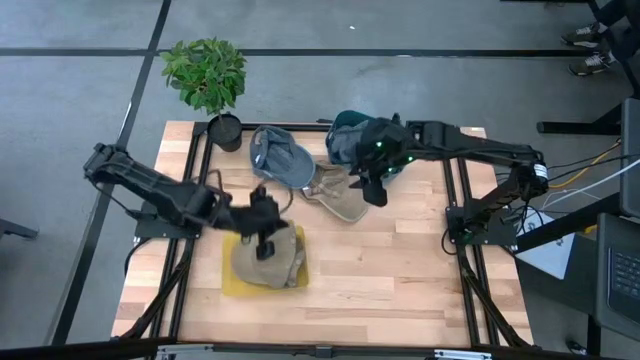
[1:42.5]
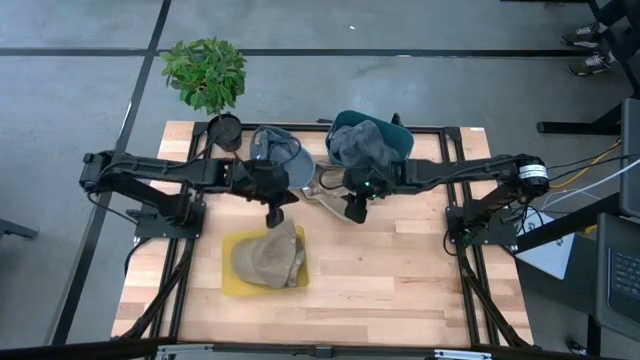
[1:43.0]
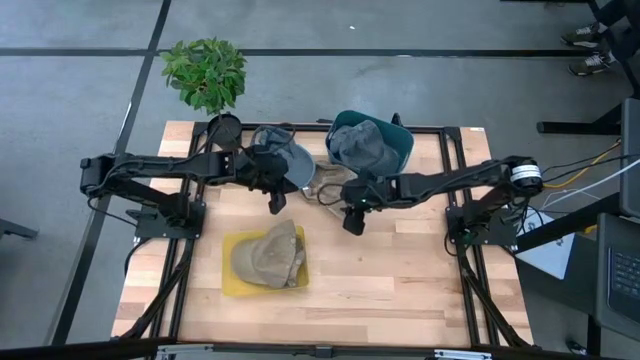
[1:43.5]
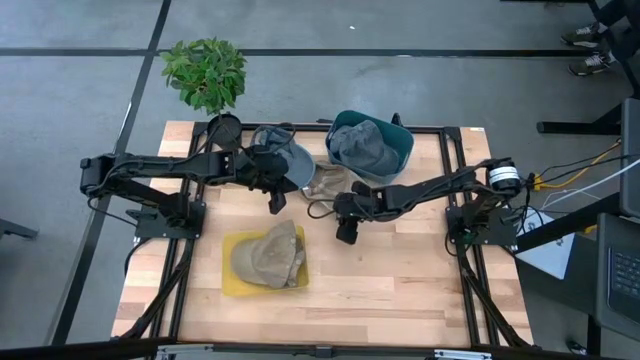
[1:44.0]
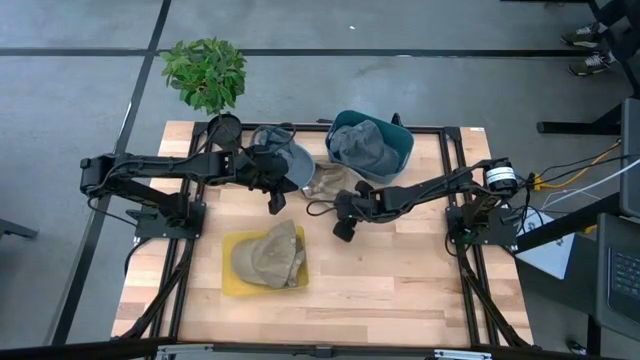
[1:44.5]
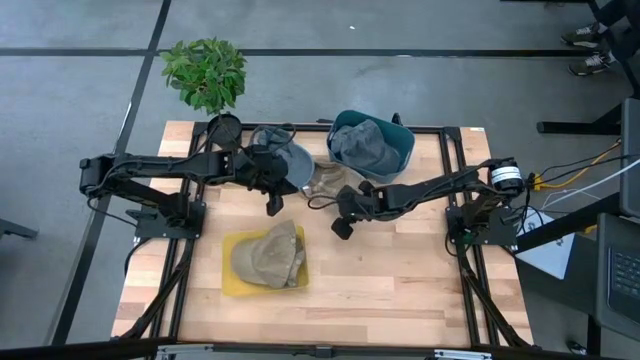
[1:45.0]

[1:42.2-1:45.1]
Task: Pick & Place hat
Put the brown cap into the yellow bin

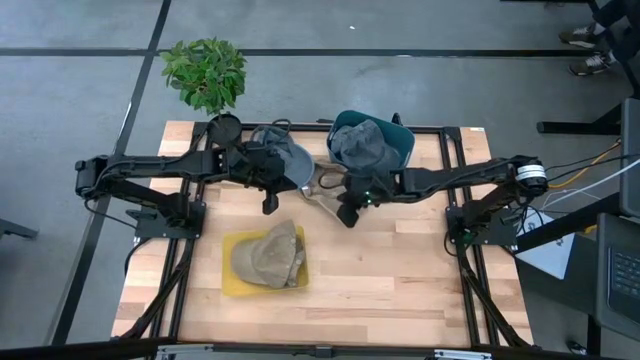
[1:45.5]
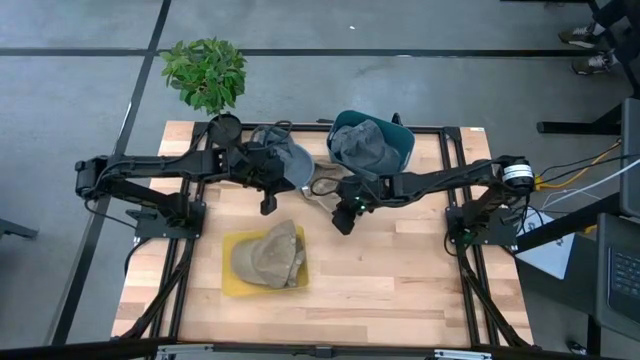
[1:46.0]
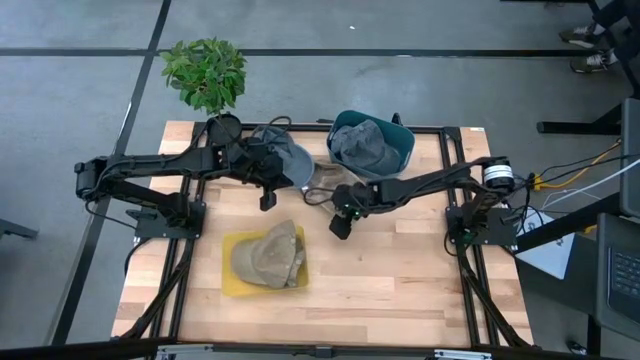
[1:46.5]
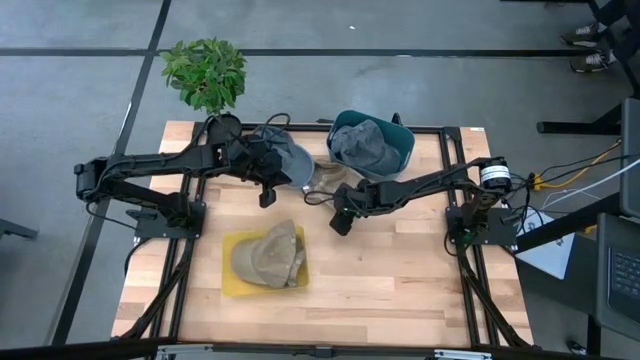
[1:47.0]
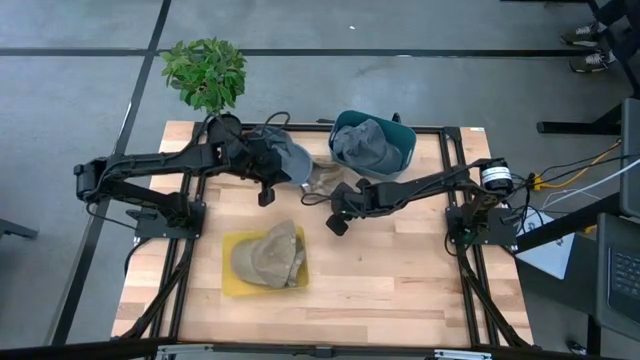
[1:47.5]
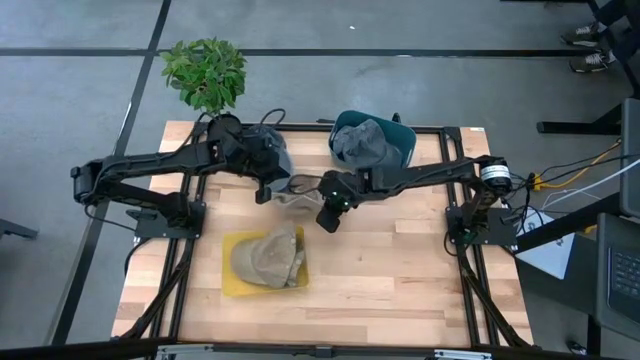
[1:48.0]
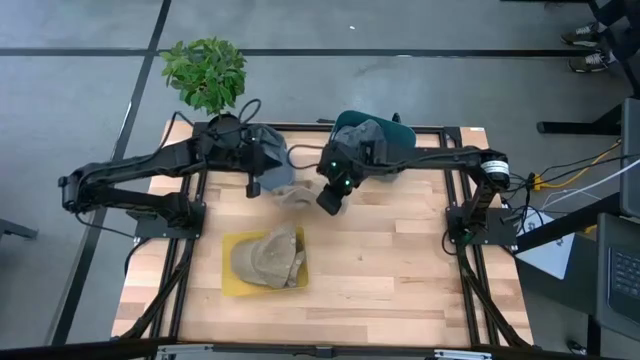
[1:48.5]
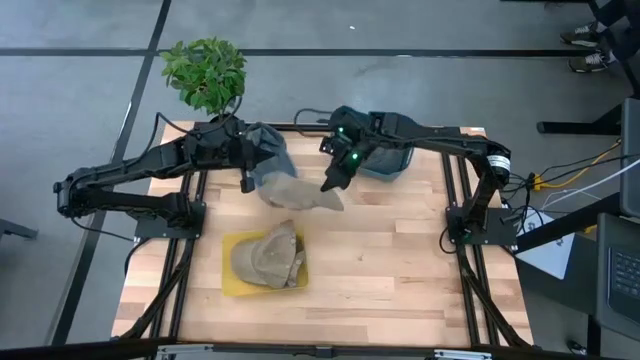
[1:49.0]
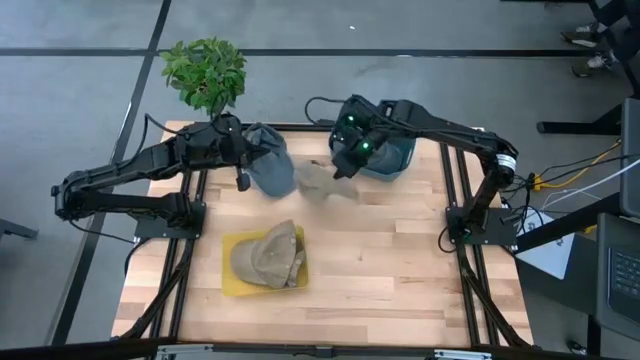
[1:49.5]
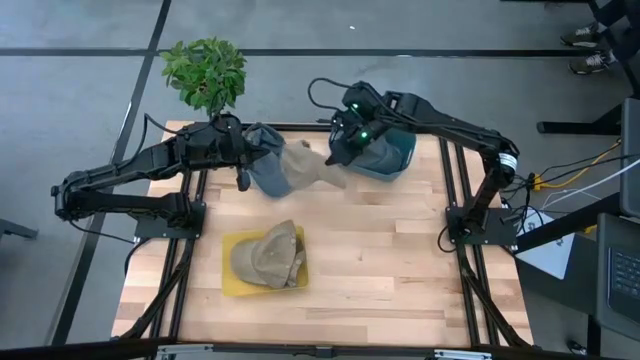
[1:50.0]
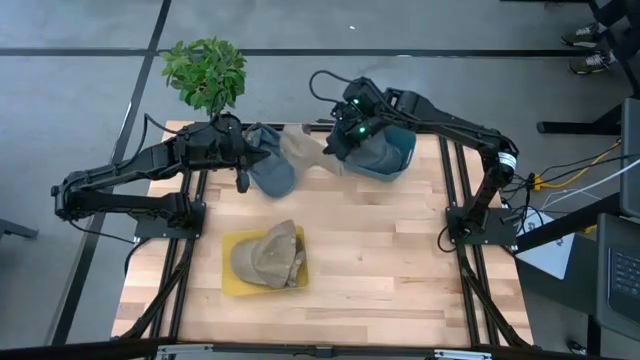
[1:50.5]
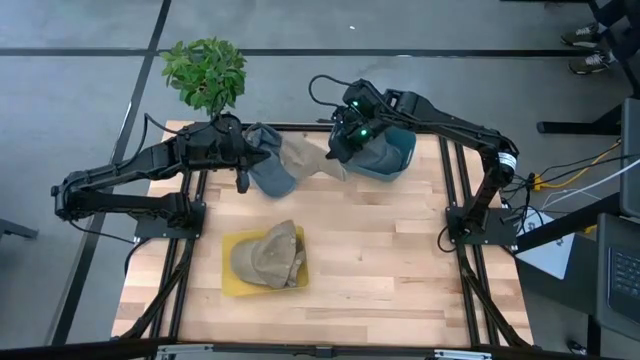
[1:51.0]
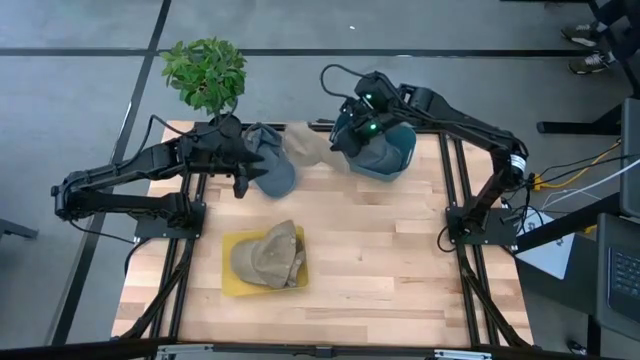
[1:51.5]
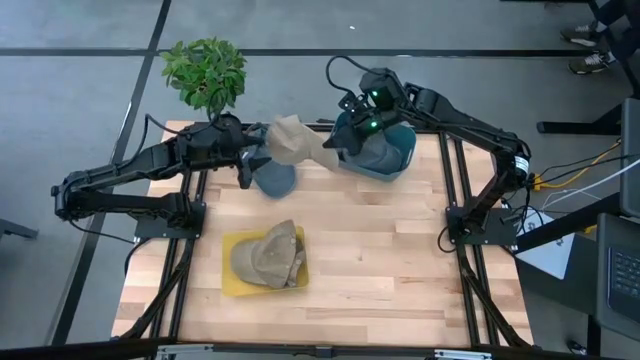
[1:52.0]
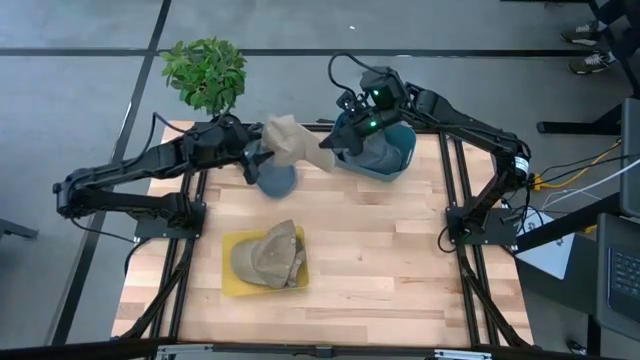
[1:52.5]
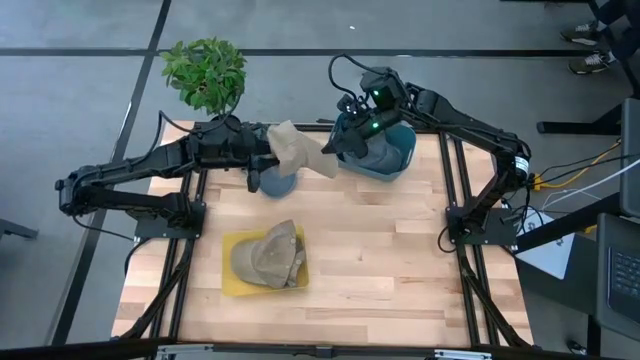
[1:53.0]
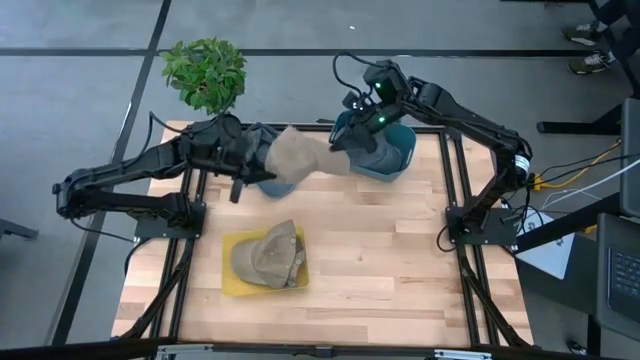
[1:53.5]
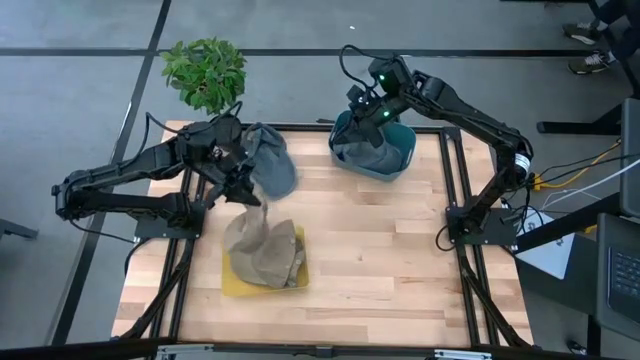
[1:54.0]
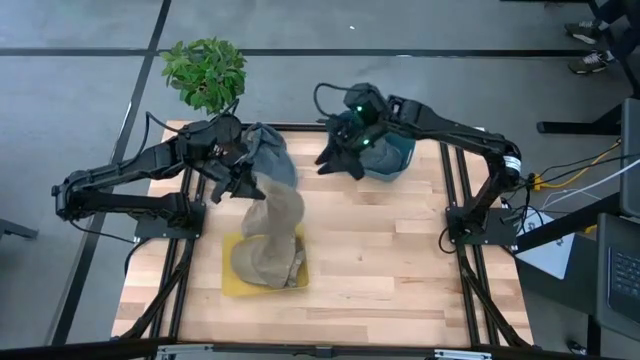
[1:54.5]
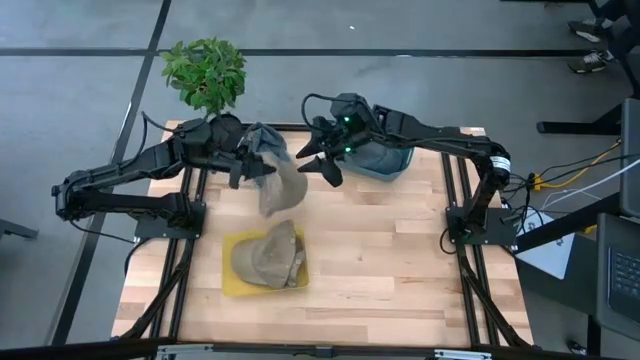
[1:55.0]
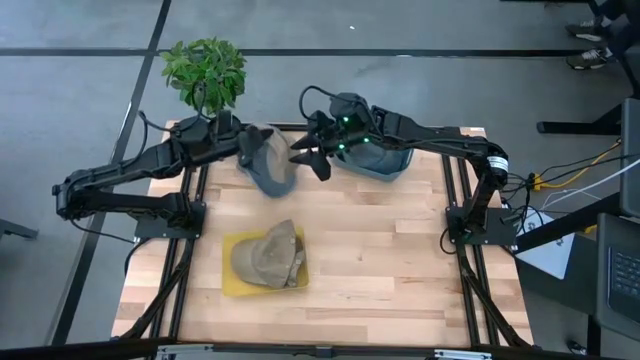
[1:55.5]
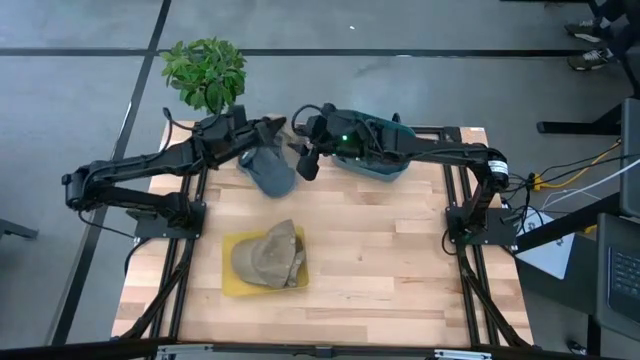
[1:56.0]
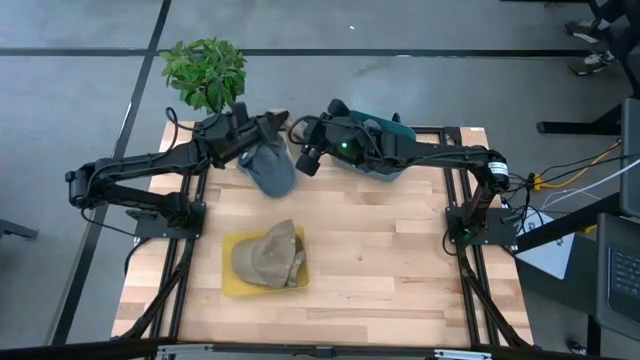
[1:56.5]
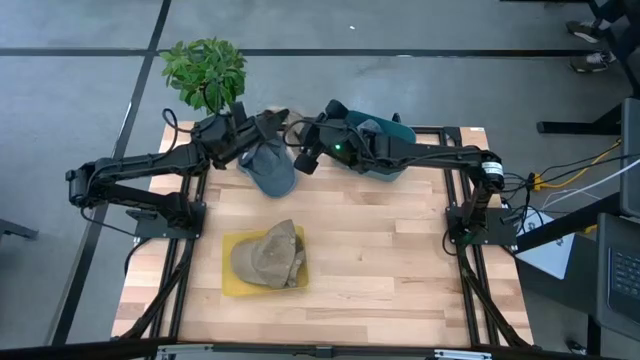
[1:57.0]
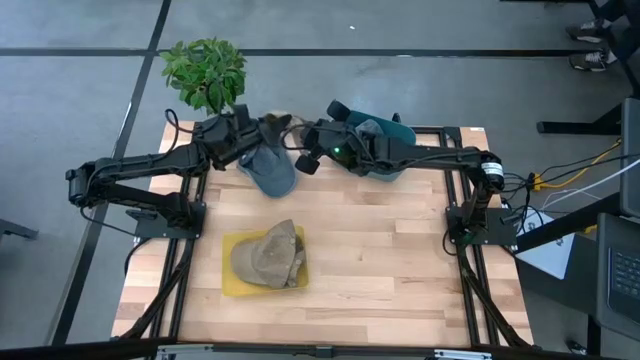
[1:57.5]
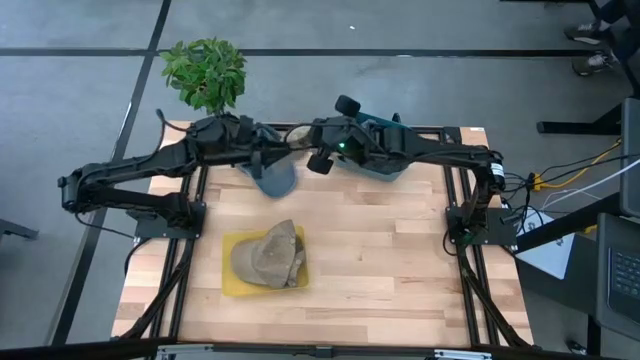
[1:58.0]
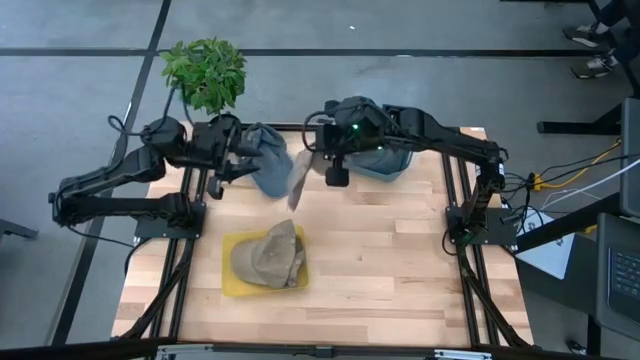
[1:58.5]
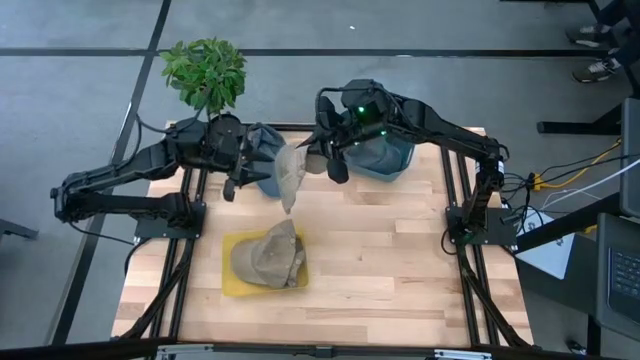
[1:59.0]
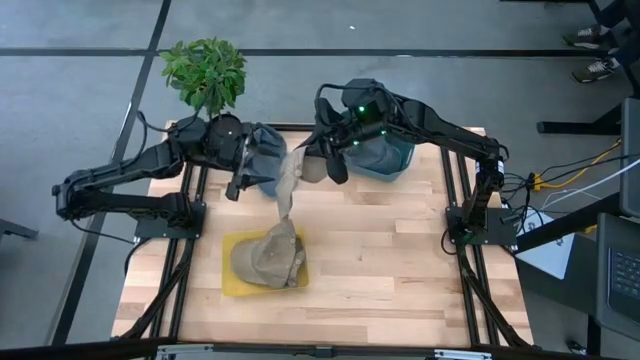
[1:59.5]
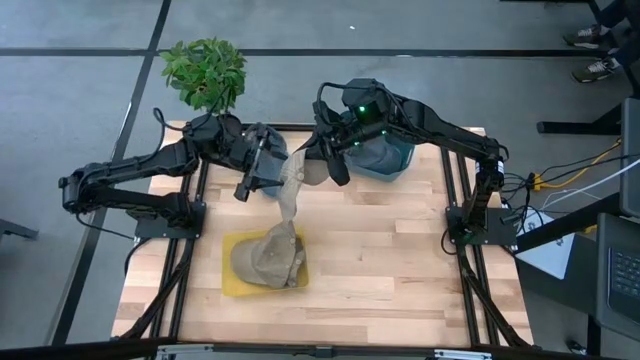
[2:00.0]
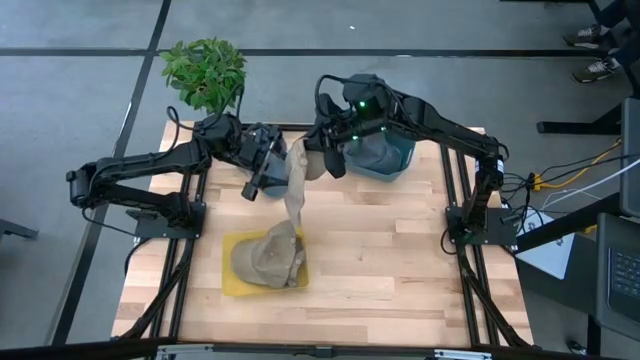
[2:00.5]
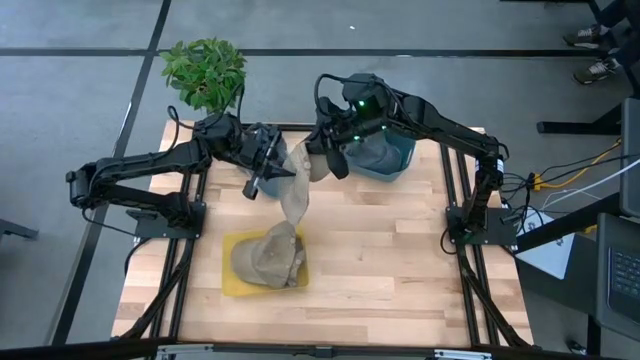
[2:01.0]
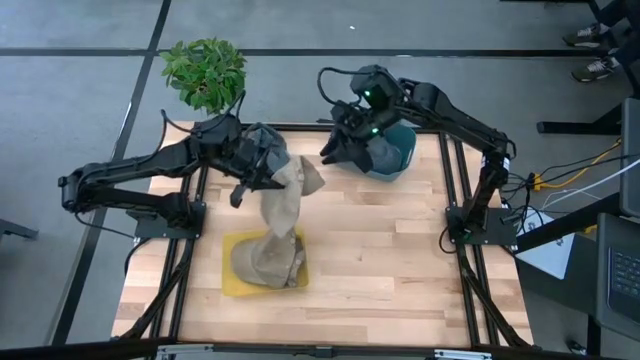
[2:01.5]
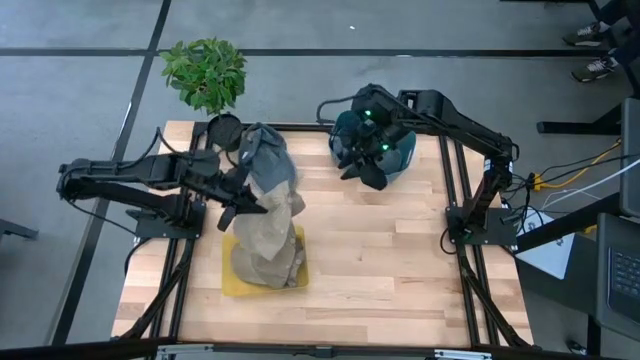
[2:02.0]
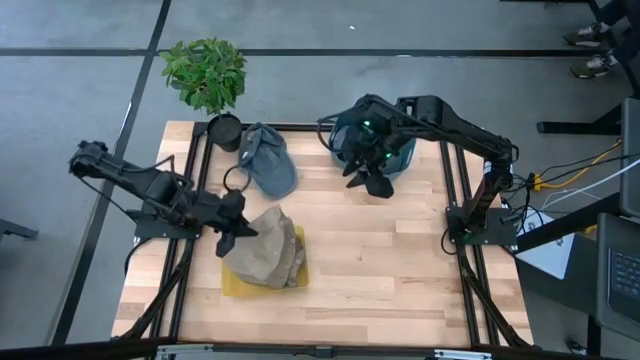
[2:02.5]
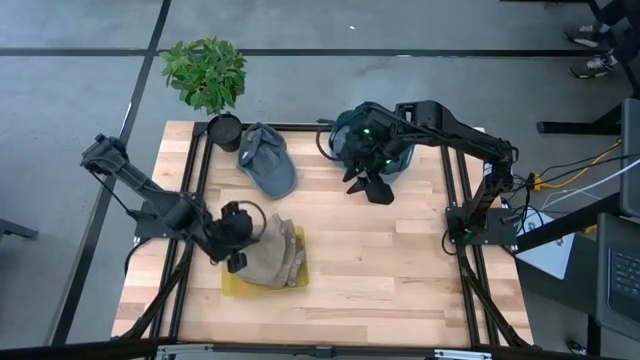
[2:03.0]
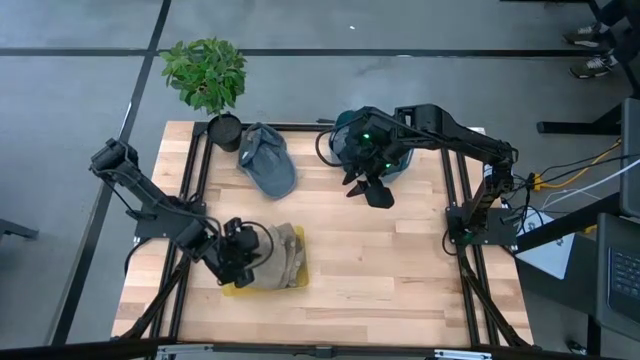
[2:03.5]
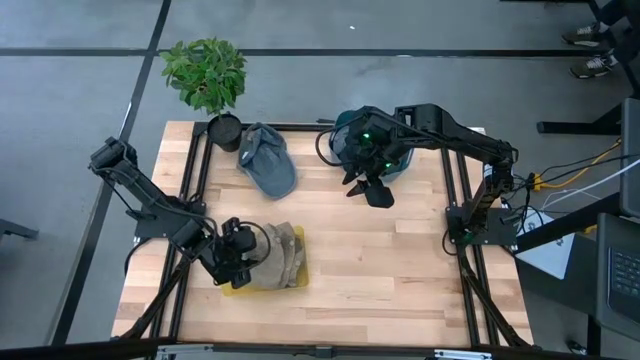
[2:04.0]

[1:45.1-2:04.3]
Put the brown cap into the yellow bin
